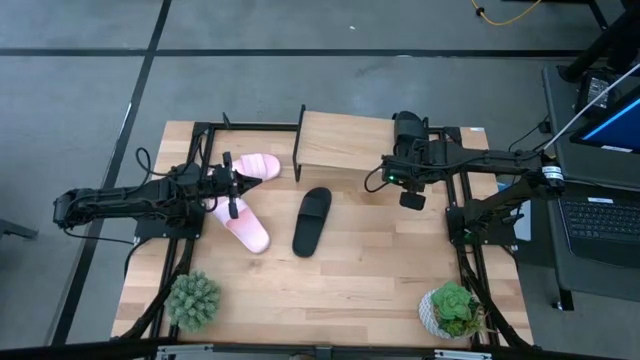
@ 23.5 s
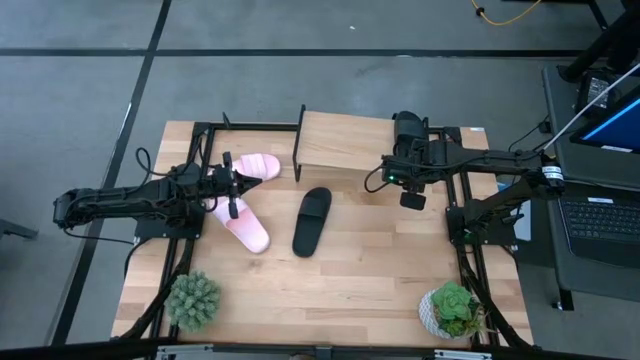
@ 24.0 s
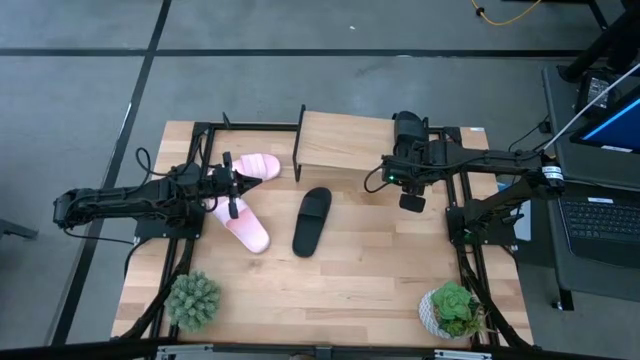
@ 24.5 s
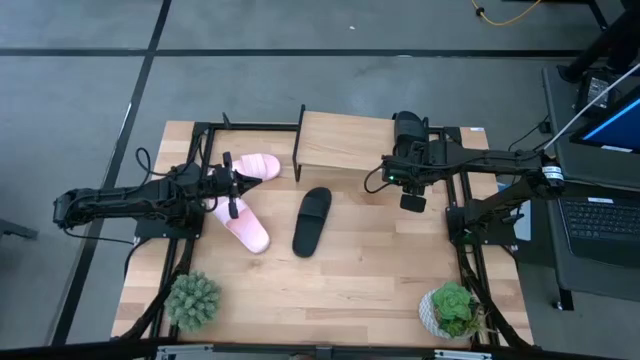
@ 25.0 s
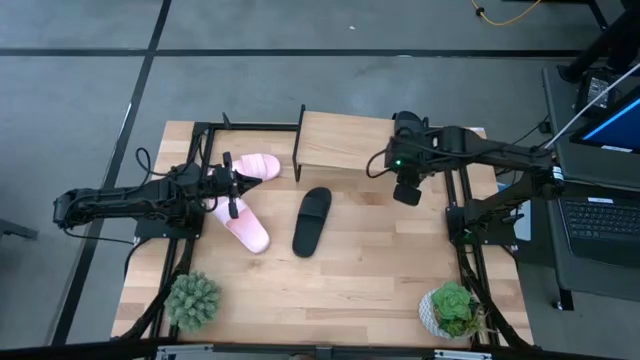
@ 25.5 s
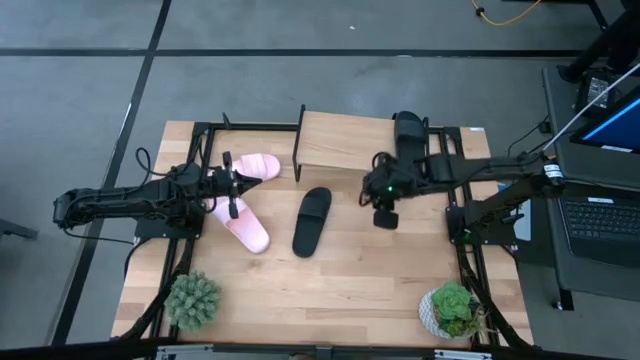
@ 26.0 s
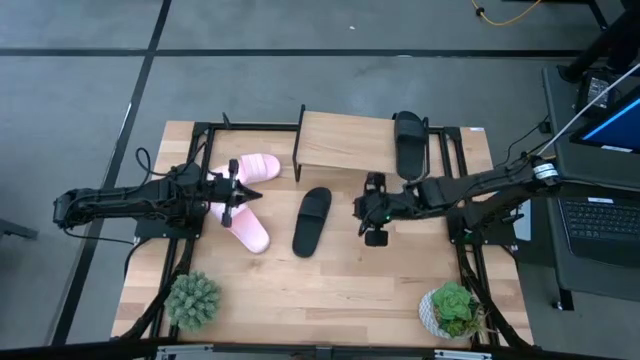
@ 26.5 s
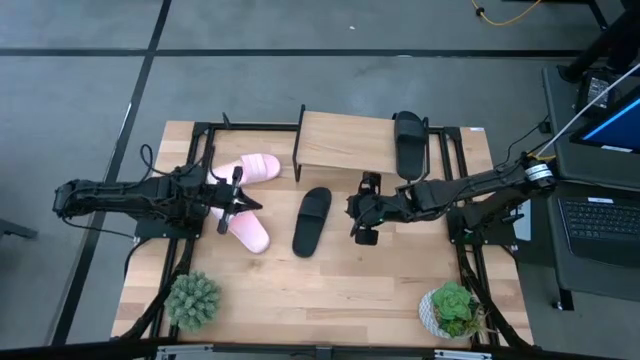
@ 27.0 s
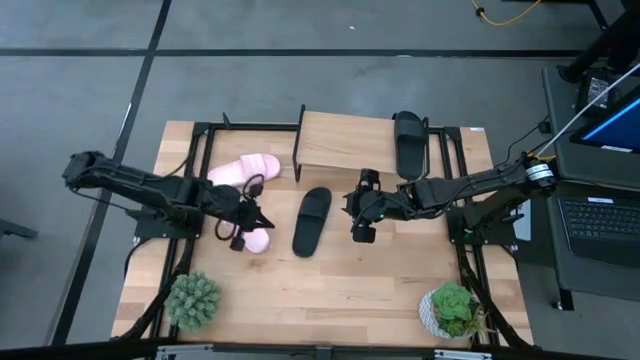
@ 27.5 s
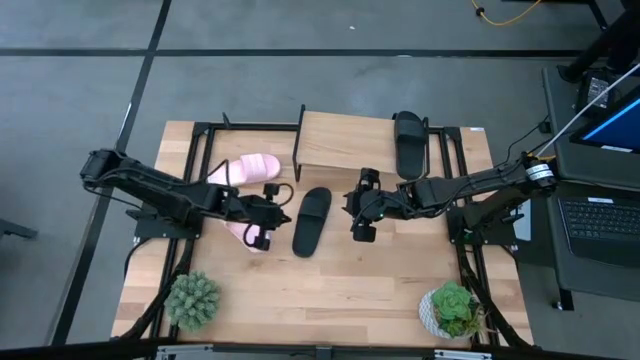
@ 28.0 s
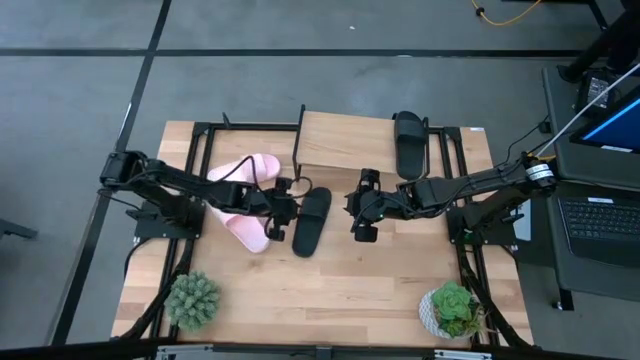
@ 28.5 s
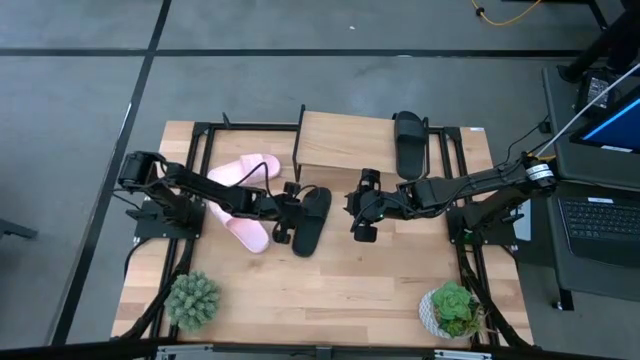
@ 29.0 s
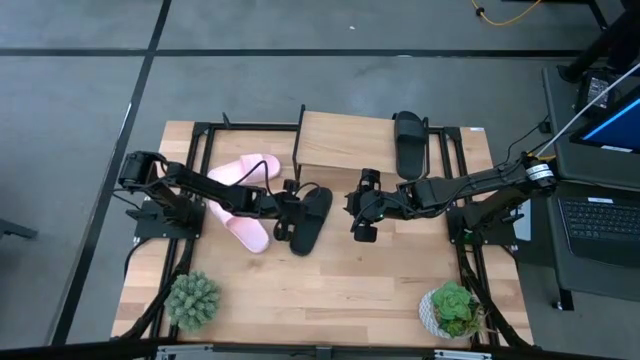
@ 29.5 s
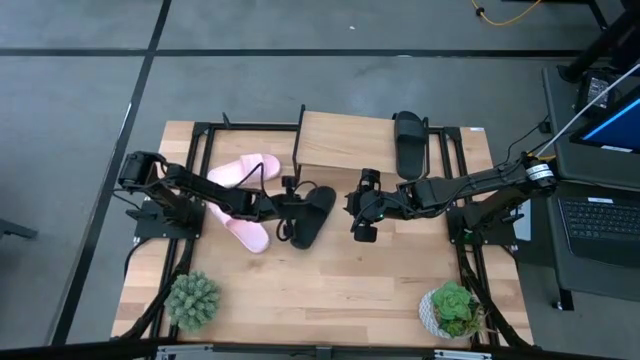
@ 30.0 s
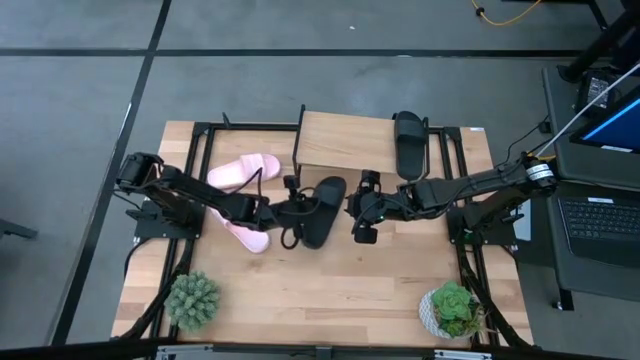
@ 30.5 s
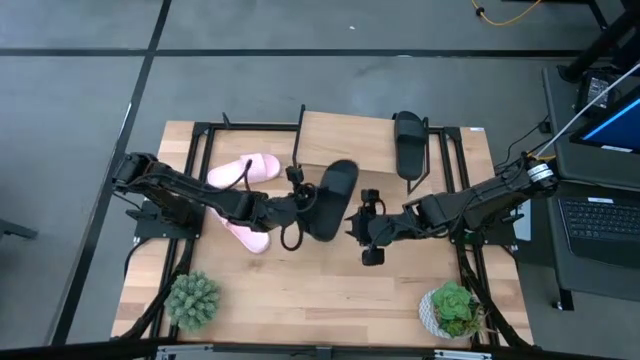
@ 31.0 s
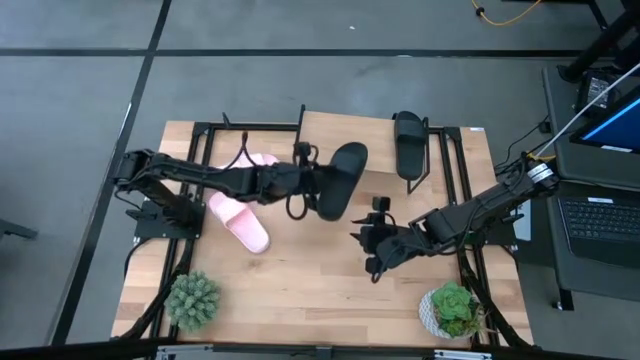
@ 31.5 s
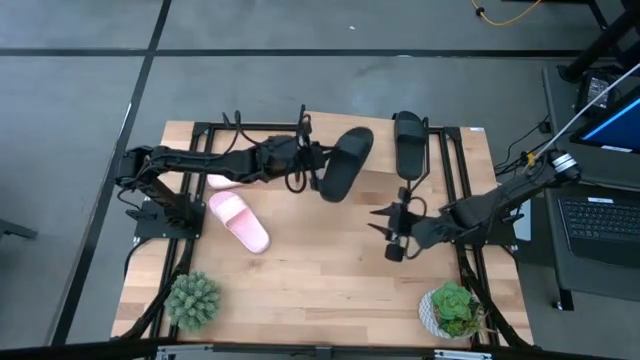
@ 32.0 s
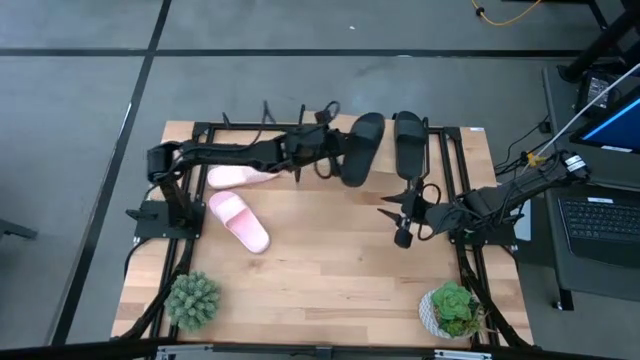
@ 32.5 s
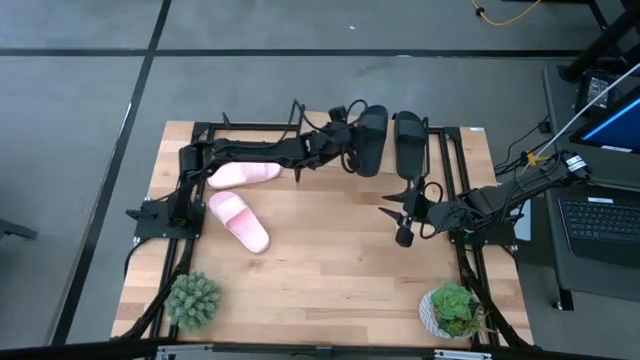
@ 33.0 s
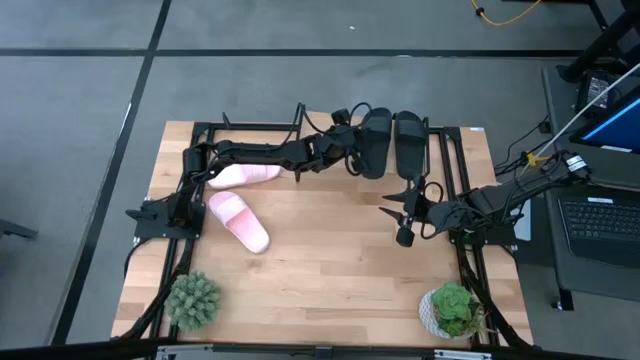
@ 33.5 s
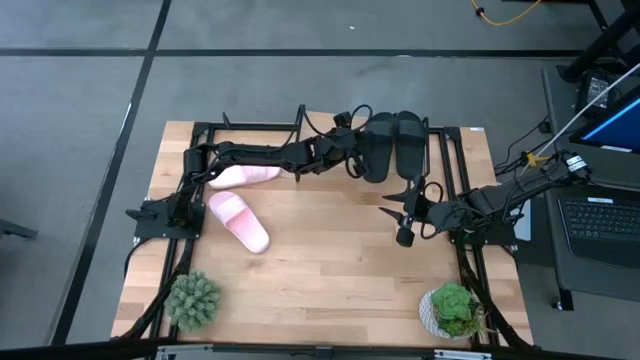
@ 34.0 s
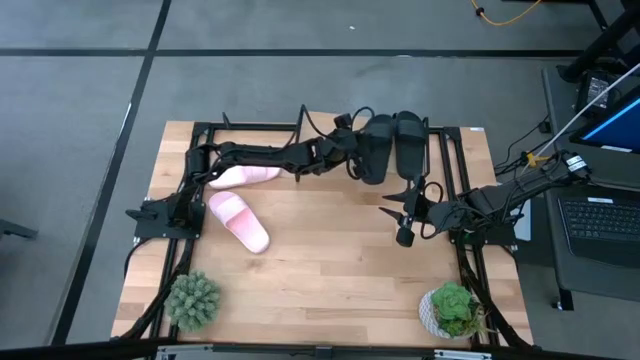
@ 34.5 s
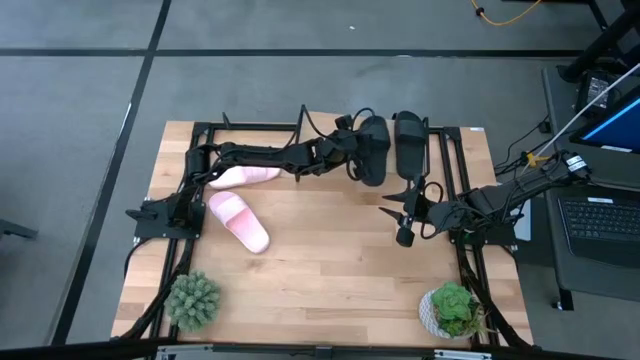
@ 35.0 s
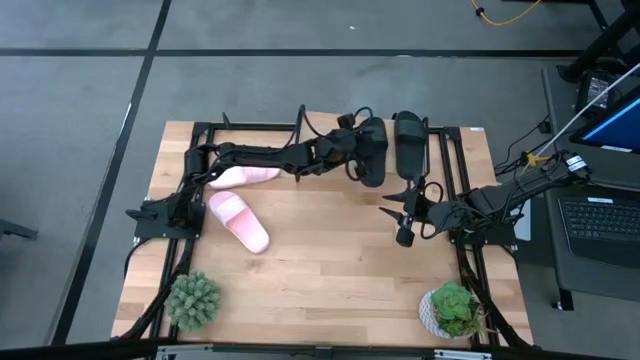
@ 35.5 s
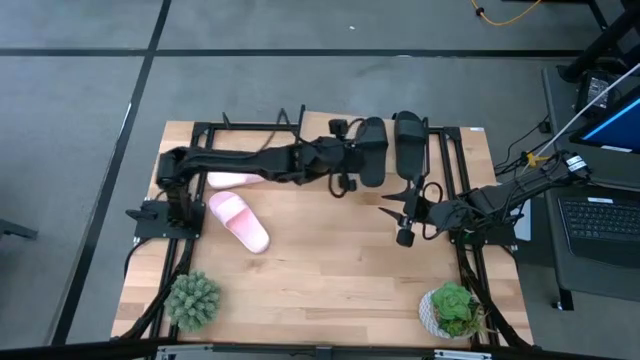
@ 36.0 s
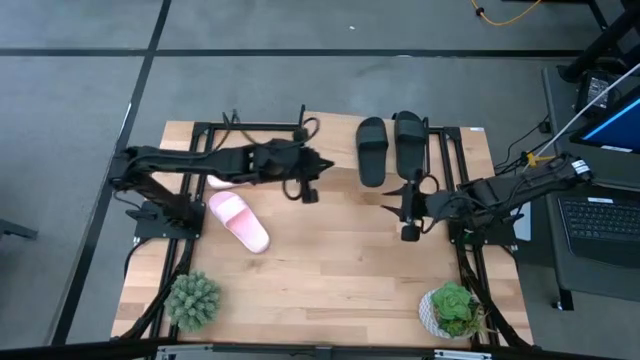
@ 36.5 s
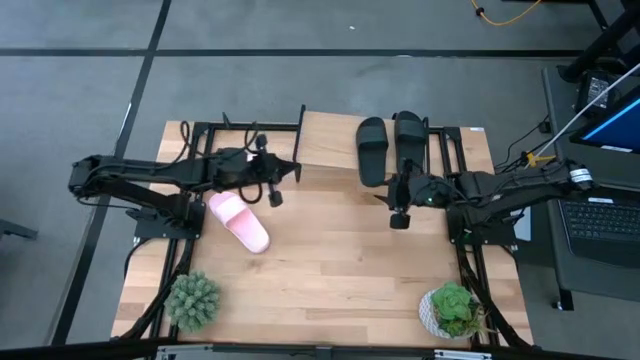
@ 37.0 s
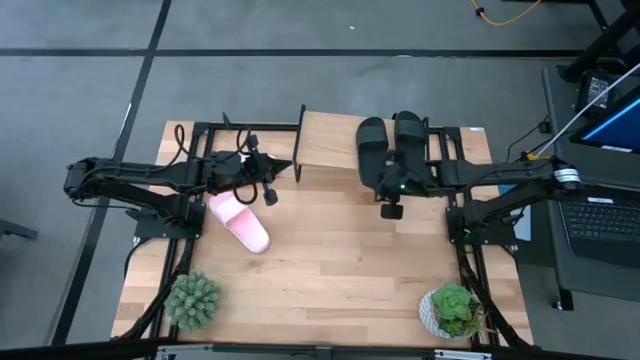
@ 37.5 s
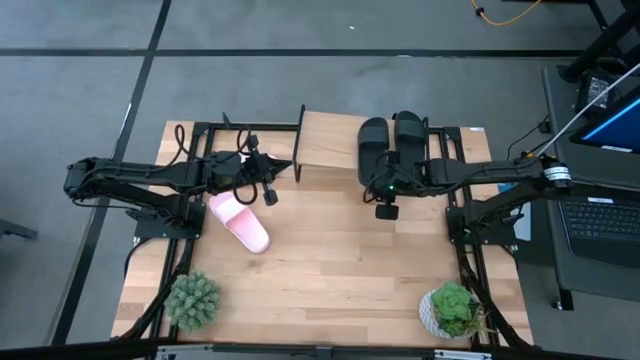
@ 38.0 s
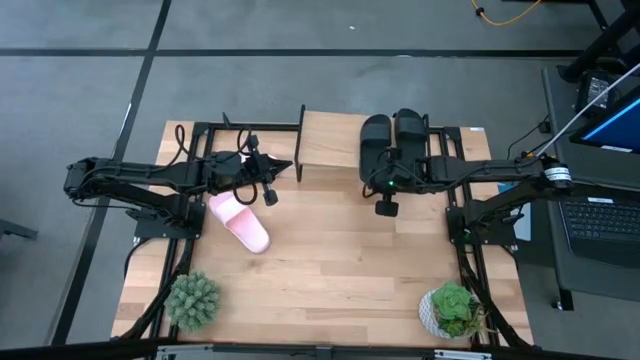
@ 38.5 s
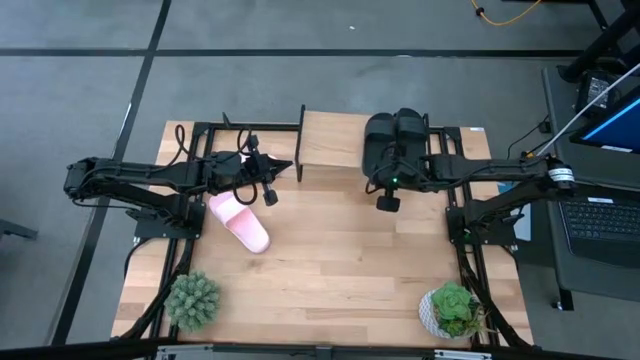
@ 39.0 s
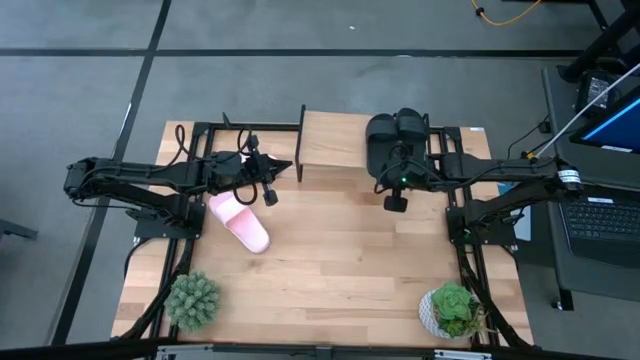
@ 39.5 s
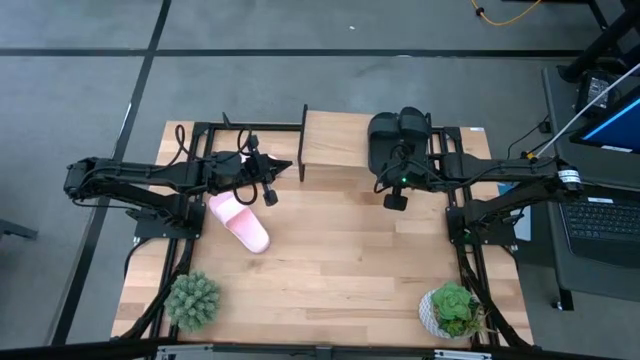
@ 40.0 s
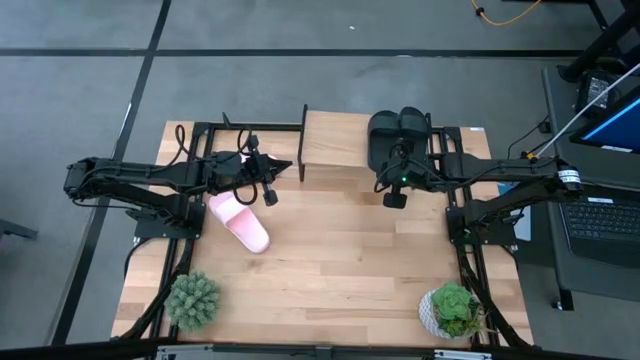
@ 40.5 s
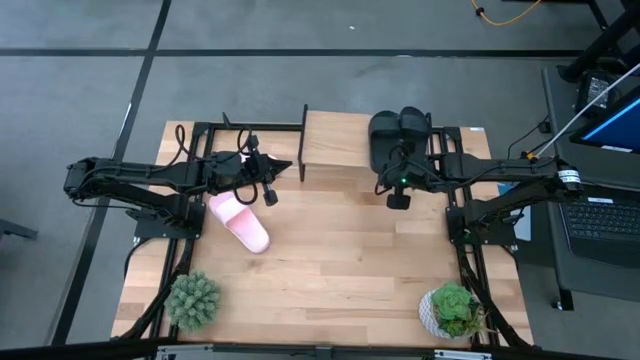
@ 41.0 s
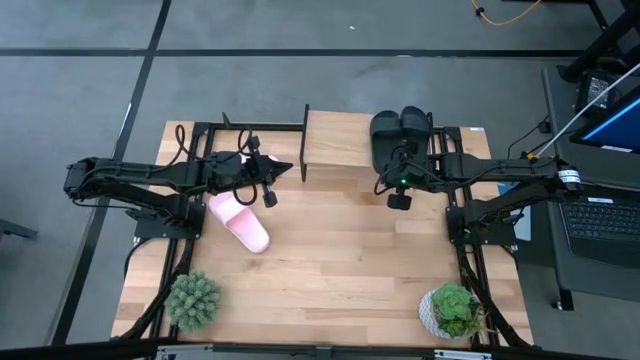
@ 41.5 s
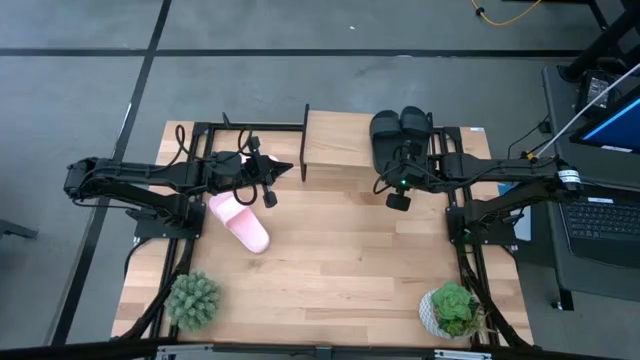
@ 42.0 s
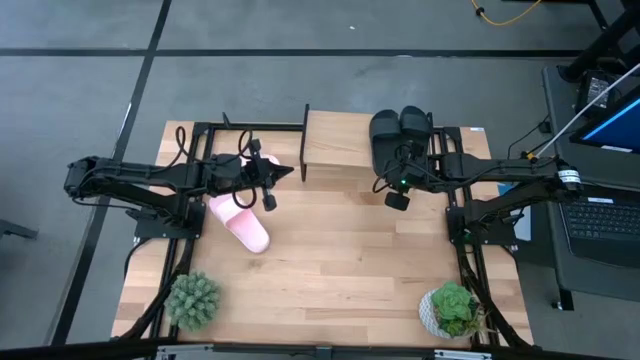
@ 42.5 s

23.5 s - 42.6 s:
Task: Pick and place slides into the shelf
Put the black slides on the shelf
